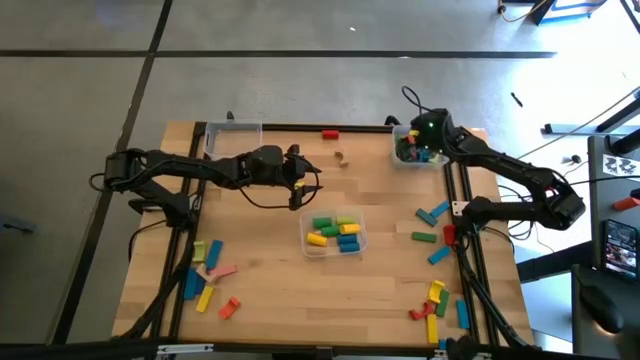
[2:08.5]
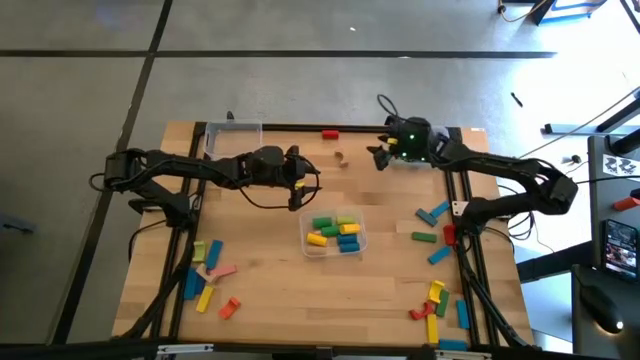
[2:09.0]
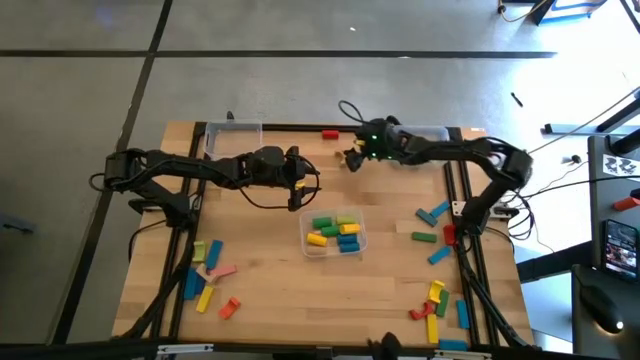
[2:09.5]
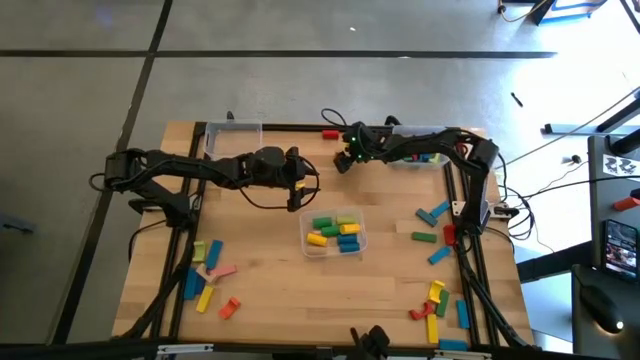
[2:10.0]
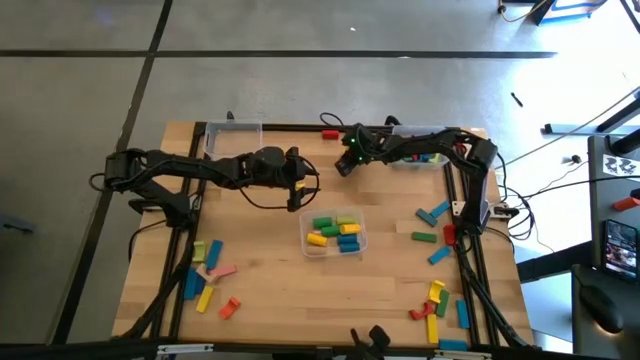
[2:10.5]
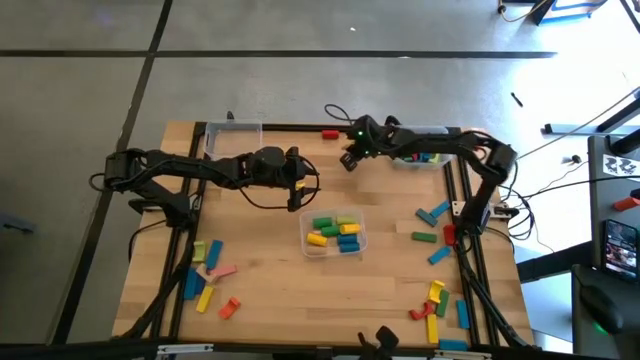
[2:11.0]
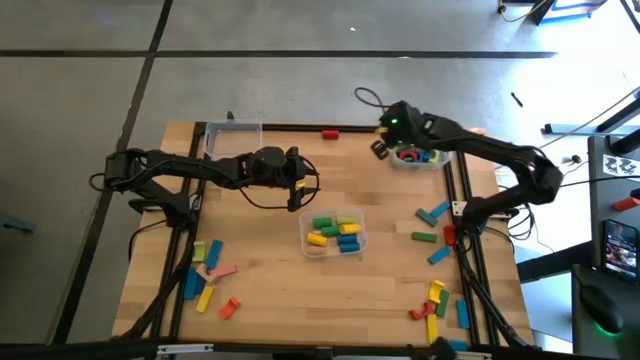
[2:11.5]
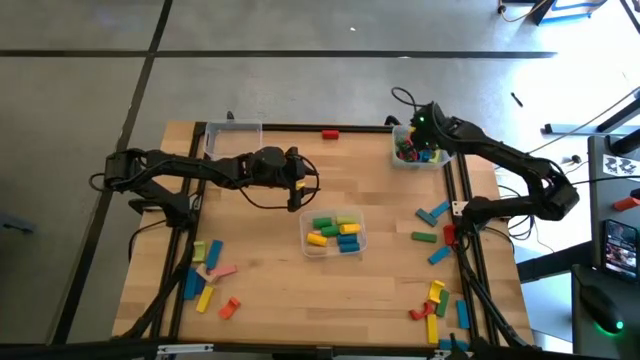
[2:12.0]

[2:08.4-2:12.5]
Task: Sort blocks by size
Put the light brown arch block into the top right transparent bin

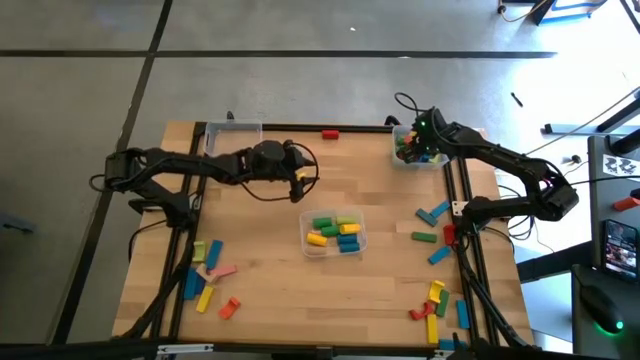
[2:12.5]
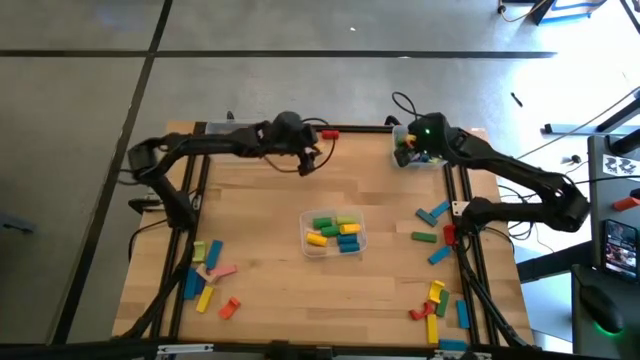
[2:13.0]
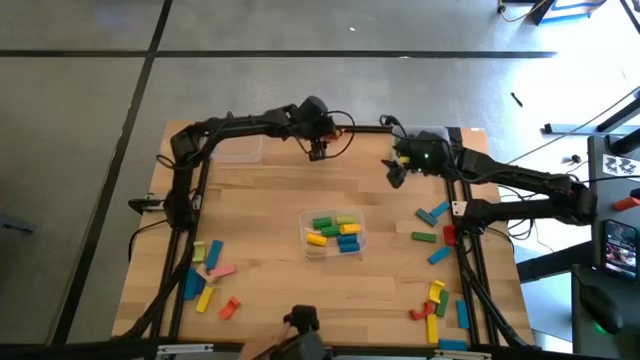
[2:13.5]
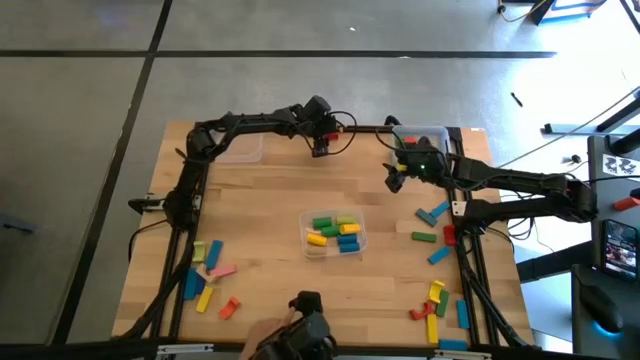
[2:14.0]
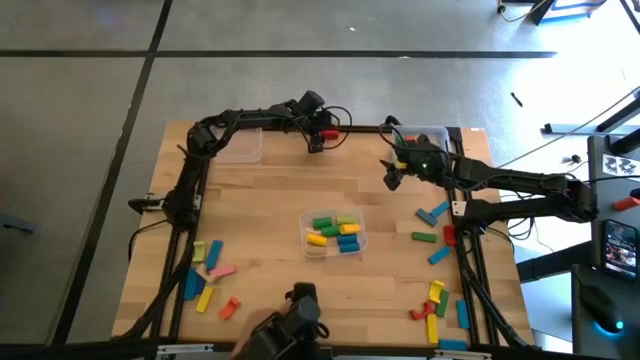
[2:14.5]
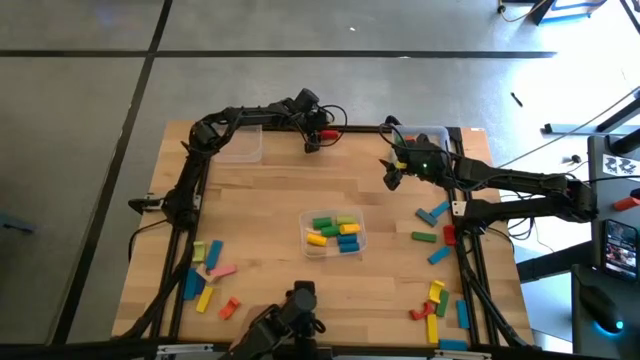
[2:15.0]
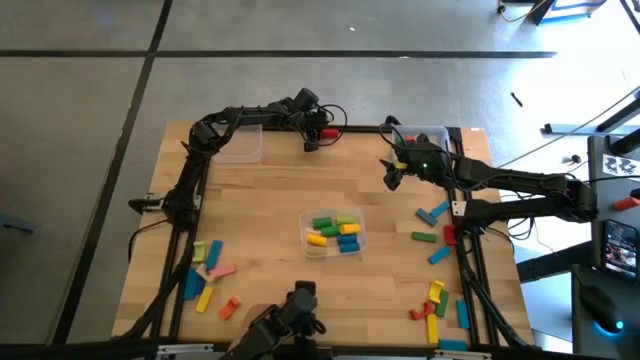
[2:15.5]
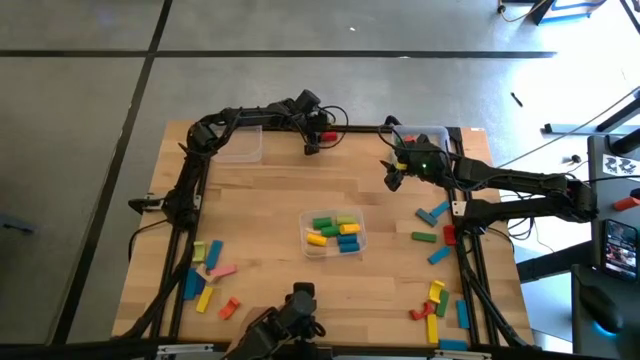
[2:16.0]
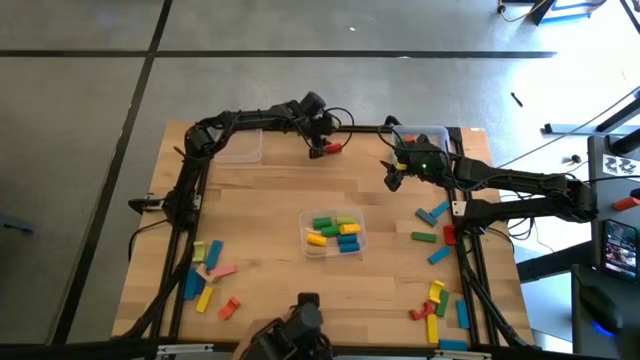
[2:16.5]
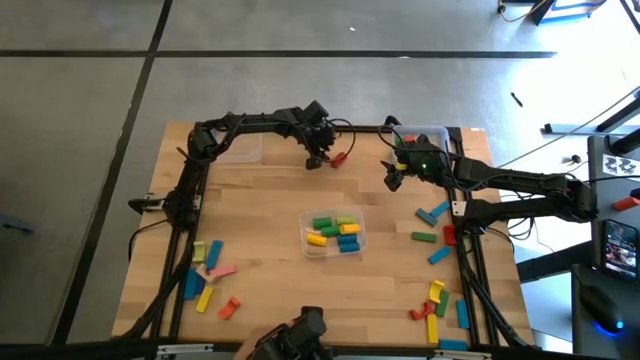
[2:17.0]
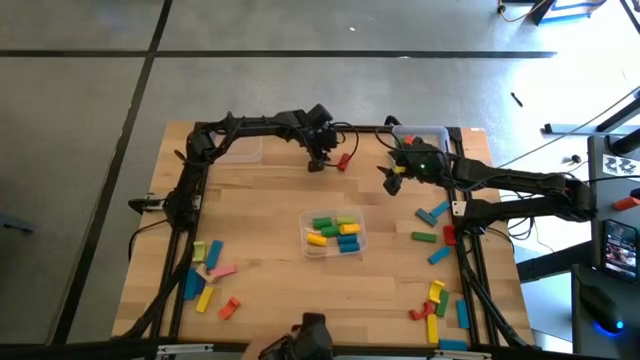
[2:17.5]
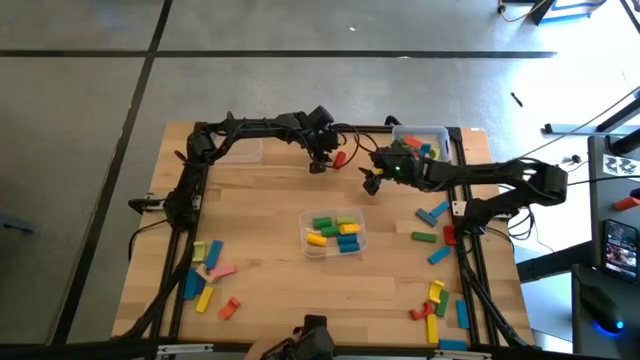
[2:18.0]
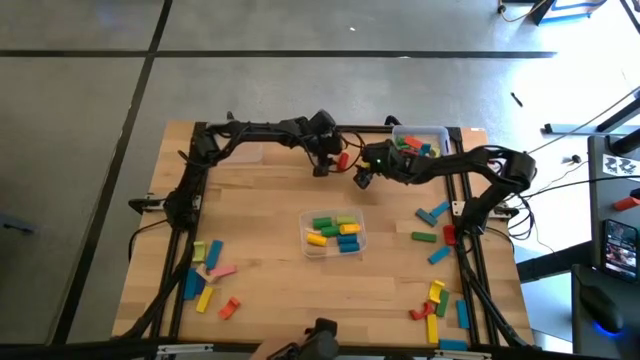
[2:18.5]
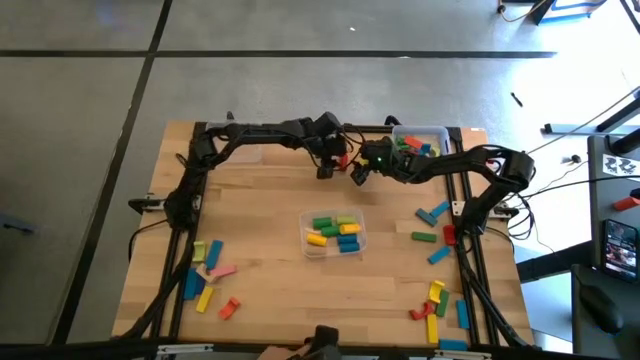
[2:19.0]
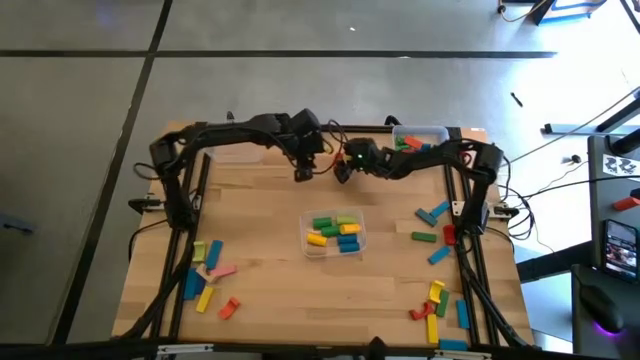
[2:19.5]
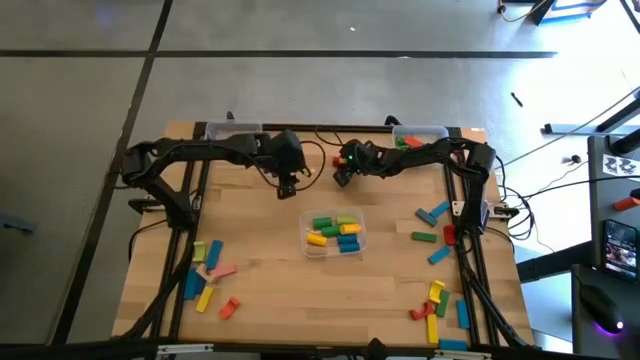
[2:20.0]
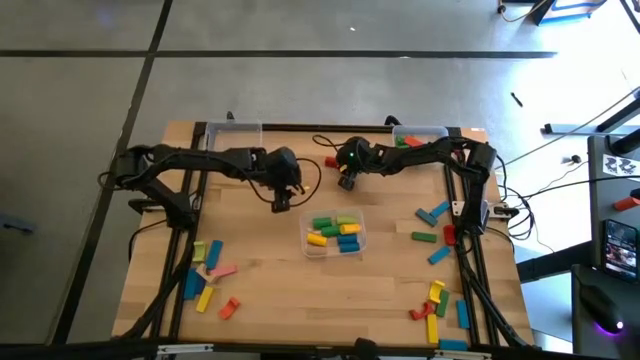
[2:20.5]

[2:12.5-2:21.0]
Put the red cylindrical block into the bottom transparent bin

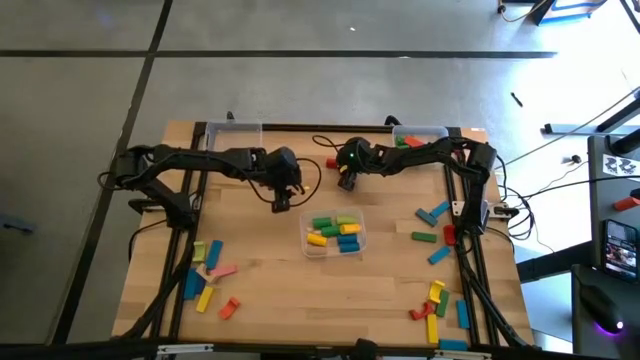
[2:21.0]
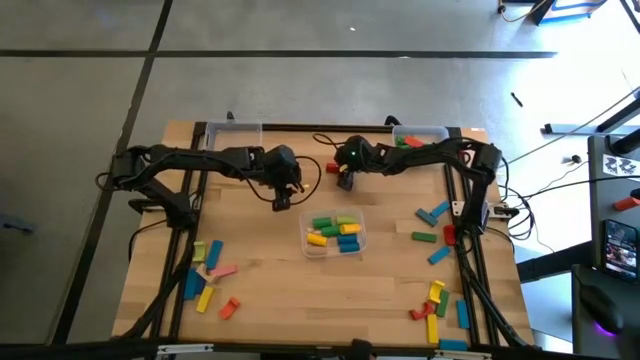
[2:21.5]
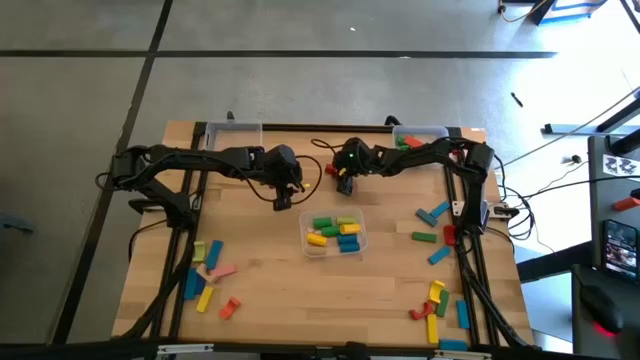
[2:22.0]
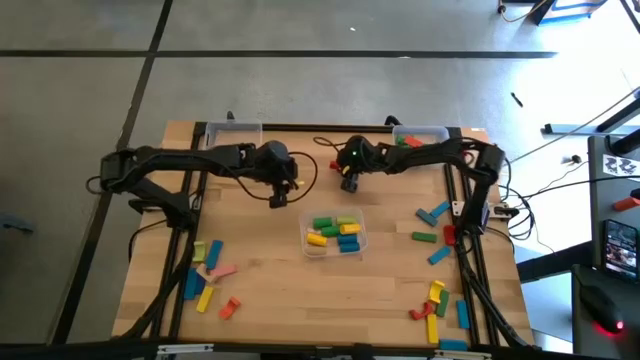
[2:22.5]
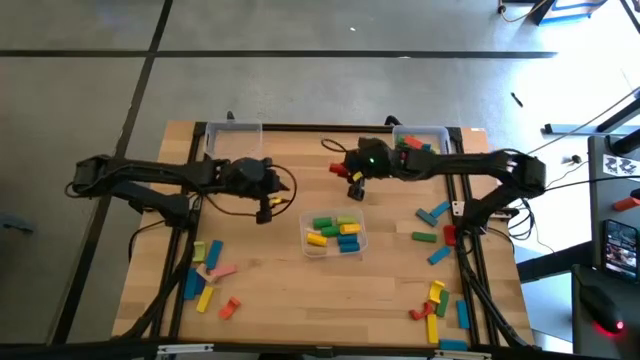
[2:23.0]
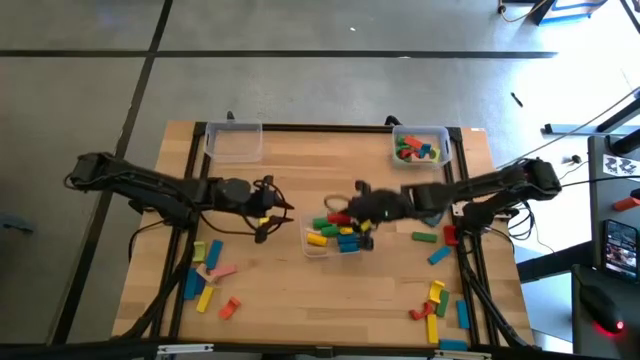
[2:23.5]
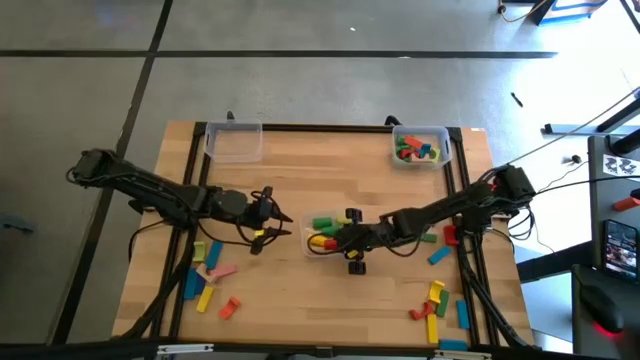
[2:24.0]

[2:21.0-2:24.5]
Put the red cylindrical block into the bottom transparent bin

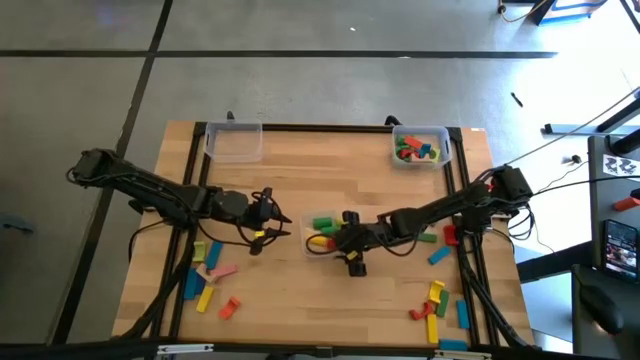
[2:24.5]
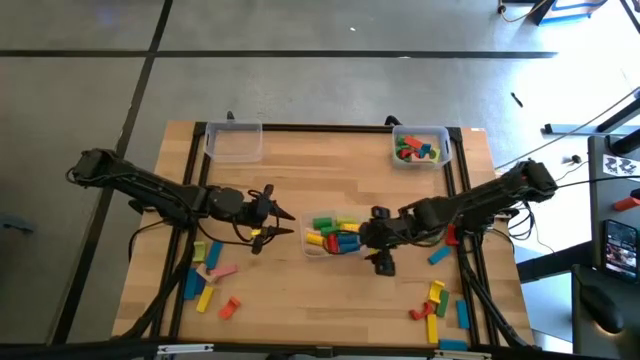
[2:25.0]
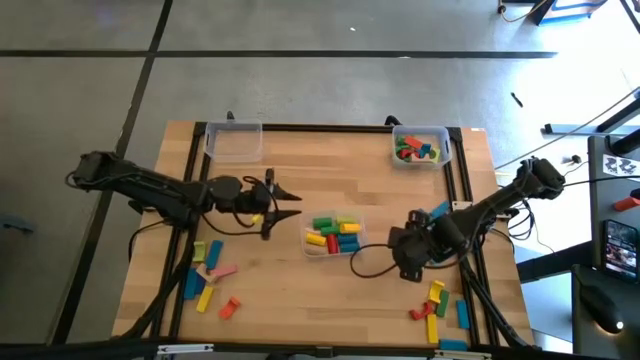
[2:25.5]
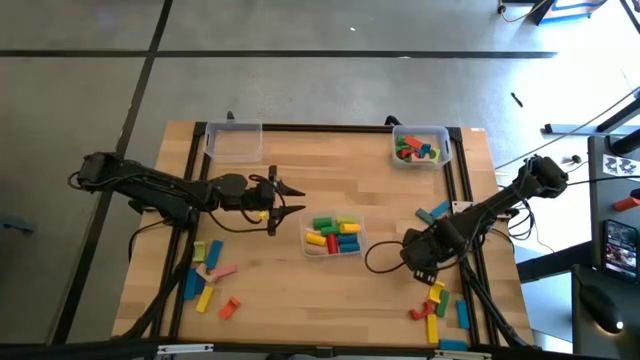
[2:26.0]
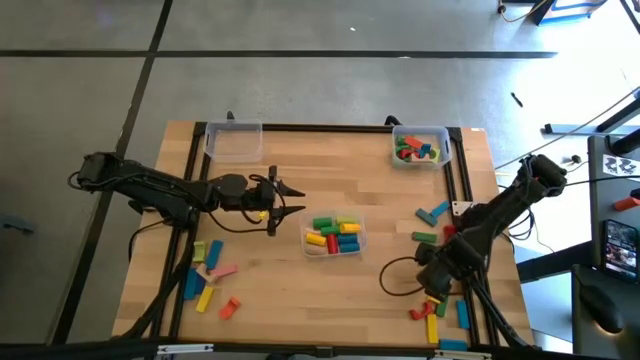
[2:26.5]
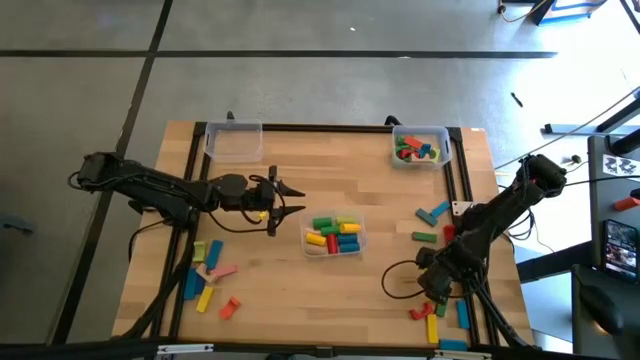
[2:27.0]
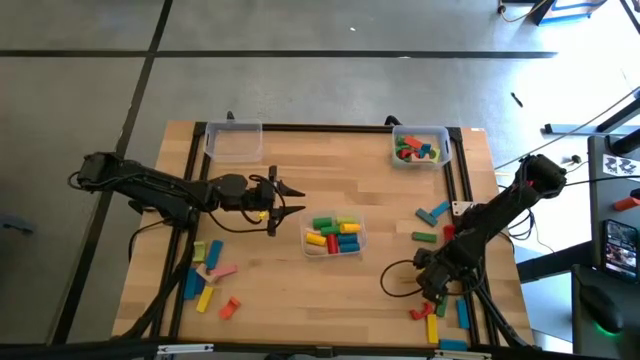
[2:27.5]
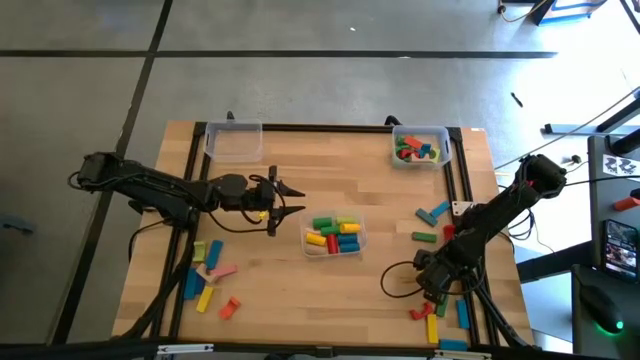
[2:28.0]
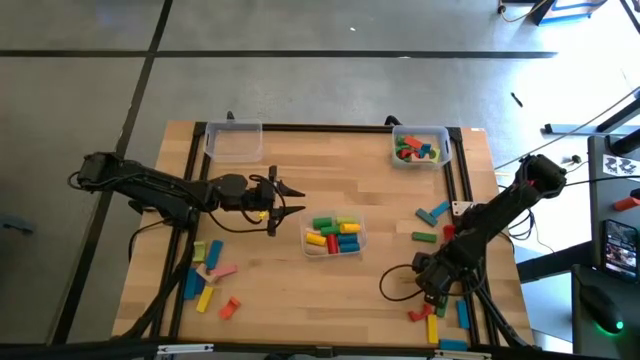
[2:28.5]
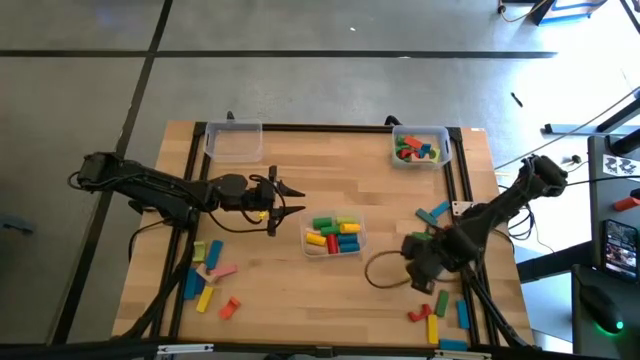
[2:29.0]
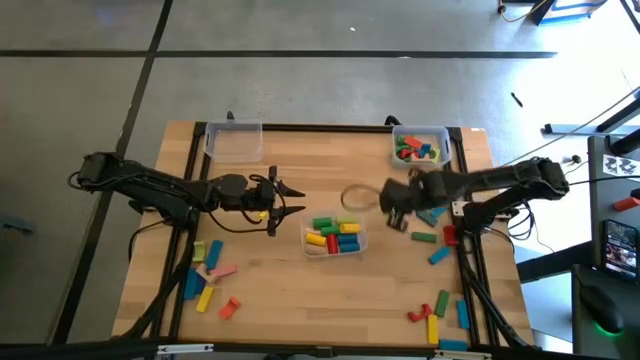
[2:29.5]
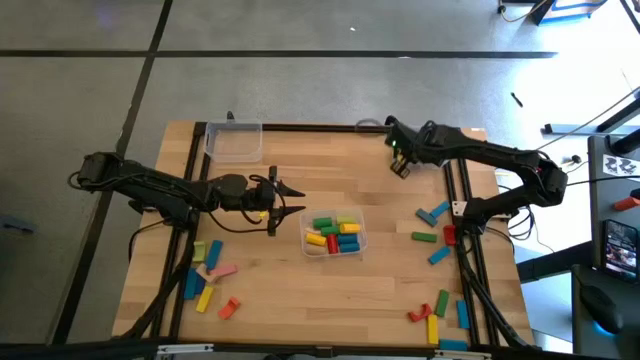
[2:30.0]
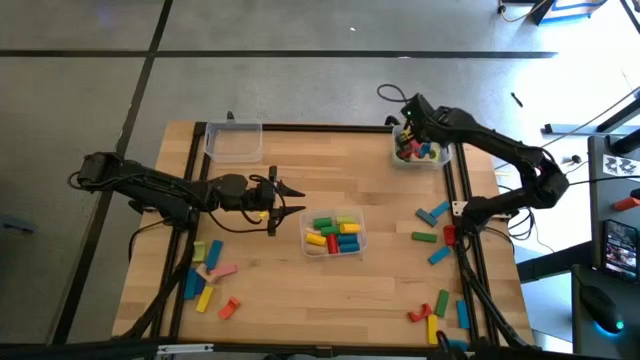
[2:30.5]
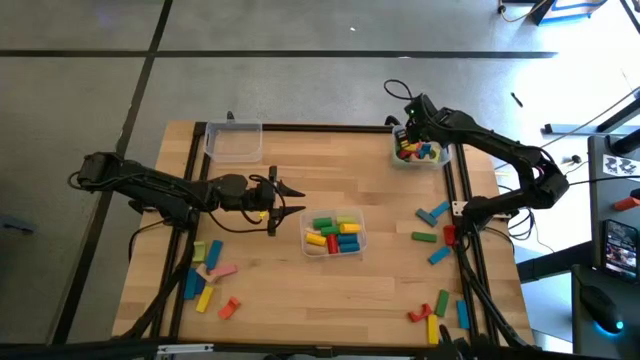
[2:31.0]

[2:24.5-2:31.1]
Put the yellow arch block into the top right transparent bin
